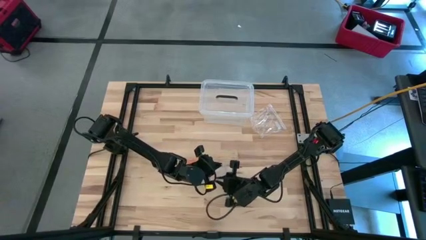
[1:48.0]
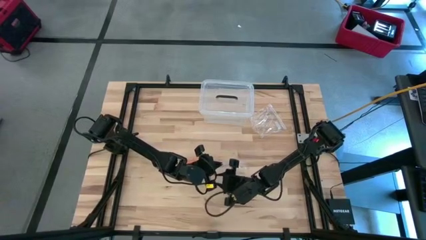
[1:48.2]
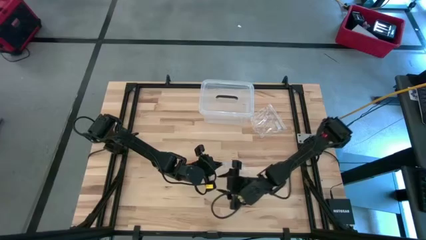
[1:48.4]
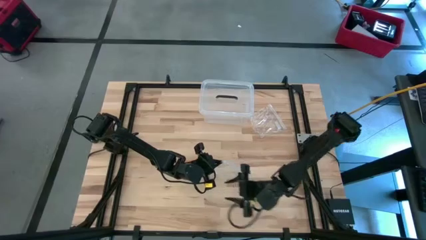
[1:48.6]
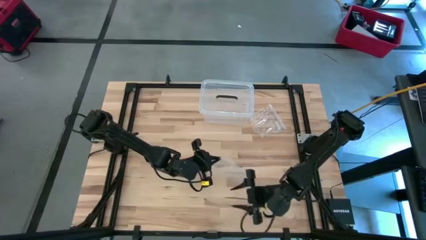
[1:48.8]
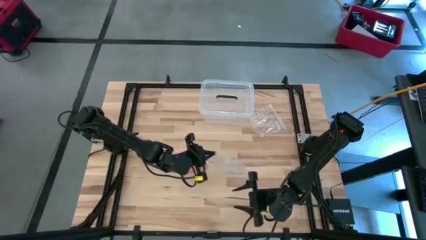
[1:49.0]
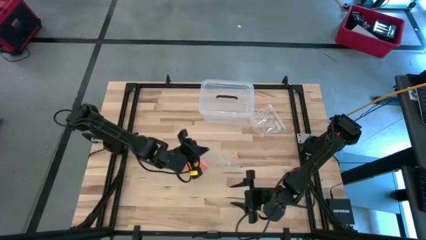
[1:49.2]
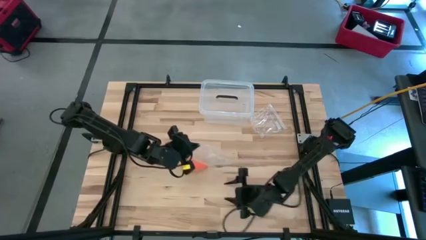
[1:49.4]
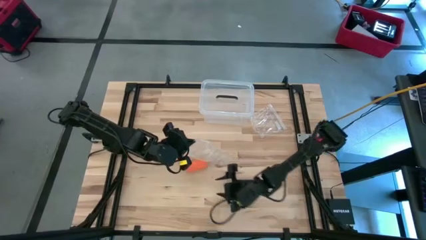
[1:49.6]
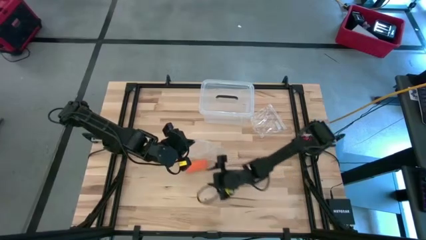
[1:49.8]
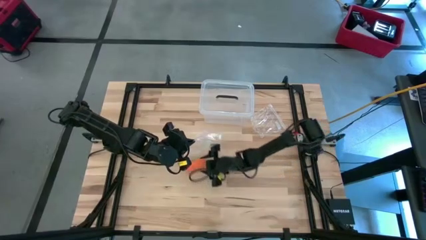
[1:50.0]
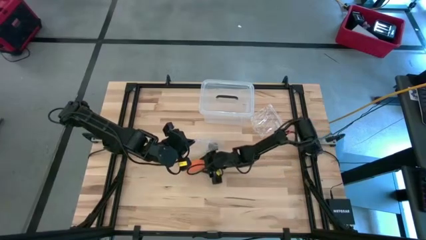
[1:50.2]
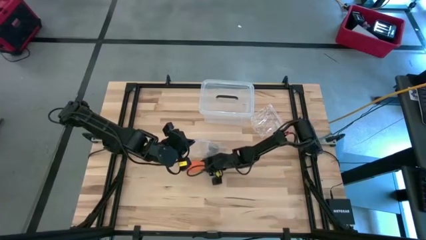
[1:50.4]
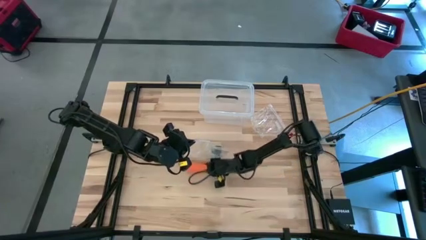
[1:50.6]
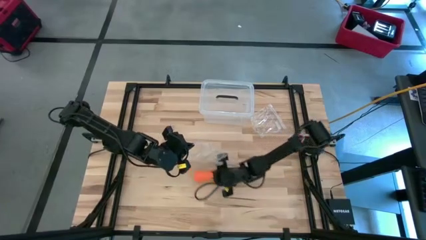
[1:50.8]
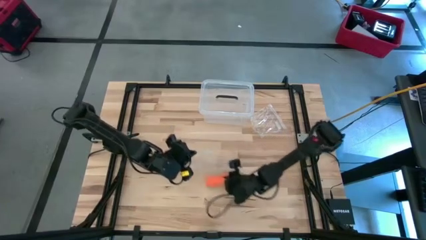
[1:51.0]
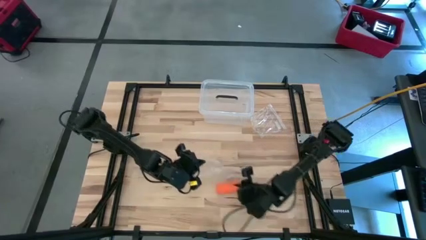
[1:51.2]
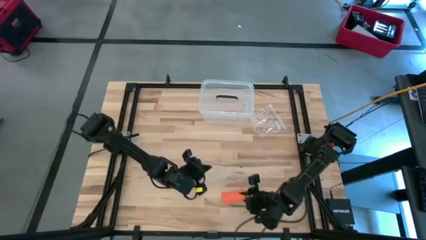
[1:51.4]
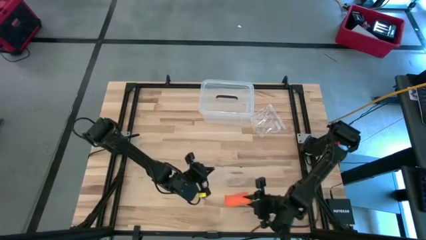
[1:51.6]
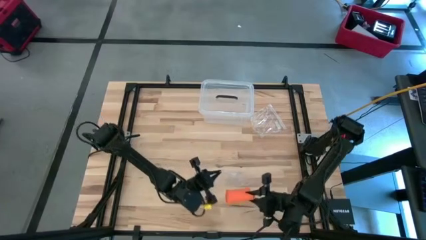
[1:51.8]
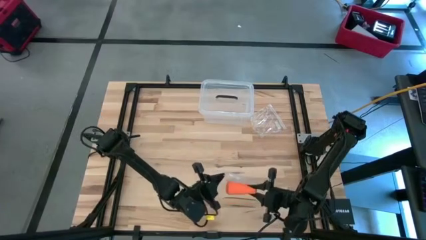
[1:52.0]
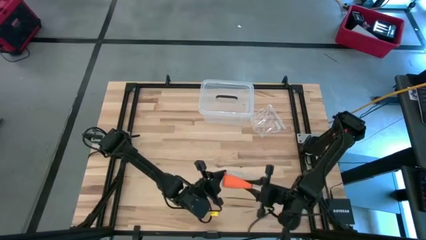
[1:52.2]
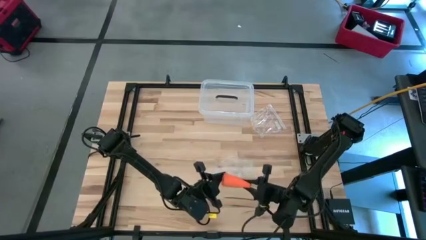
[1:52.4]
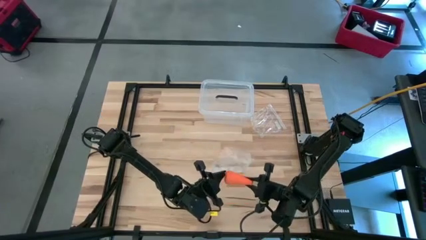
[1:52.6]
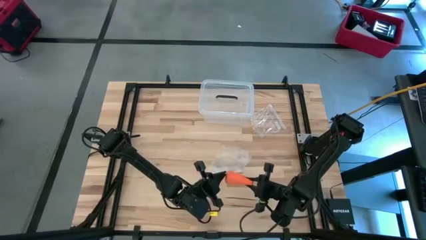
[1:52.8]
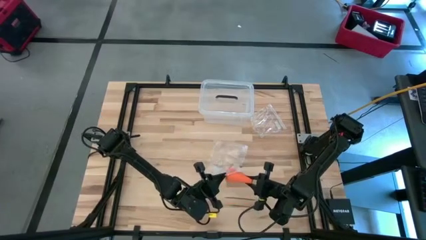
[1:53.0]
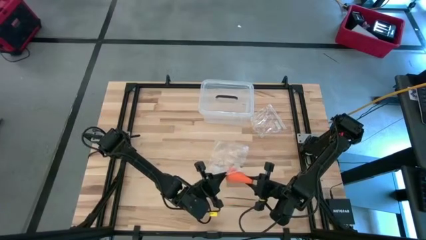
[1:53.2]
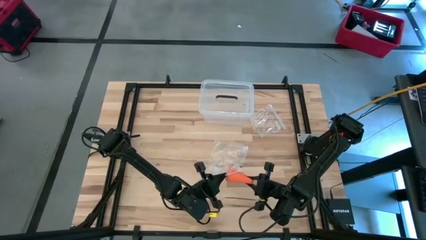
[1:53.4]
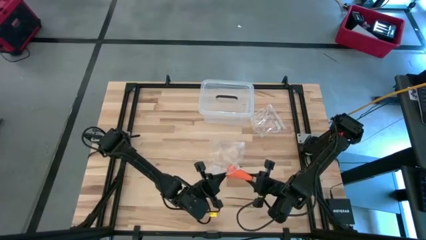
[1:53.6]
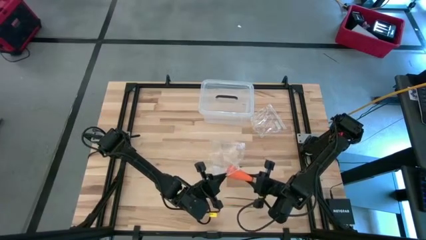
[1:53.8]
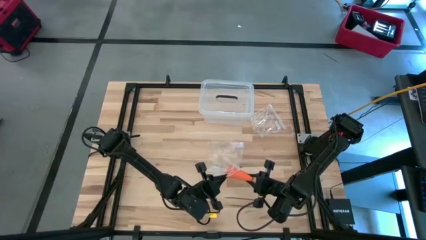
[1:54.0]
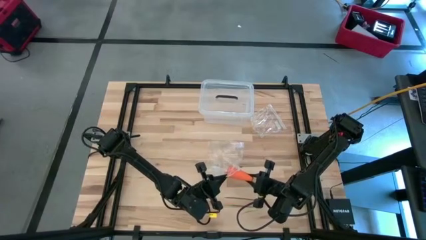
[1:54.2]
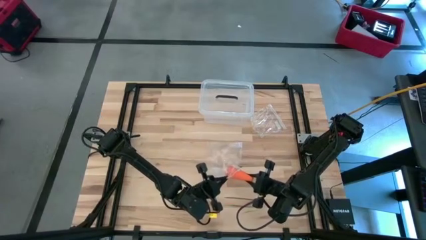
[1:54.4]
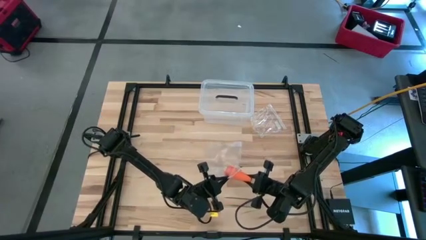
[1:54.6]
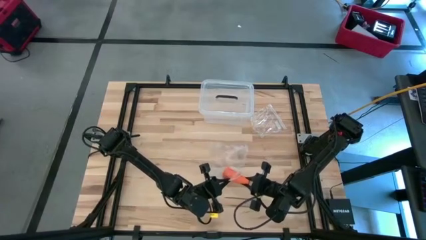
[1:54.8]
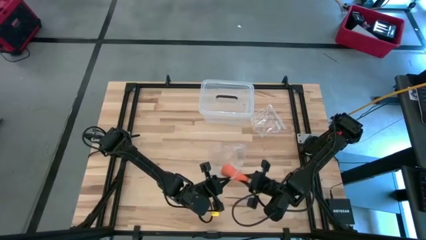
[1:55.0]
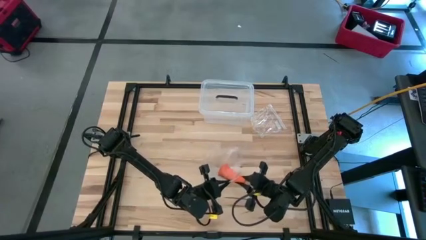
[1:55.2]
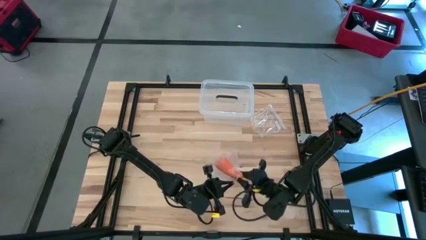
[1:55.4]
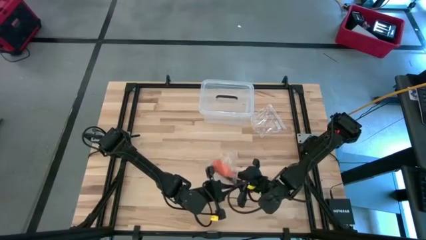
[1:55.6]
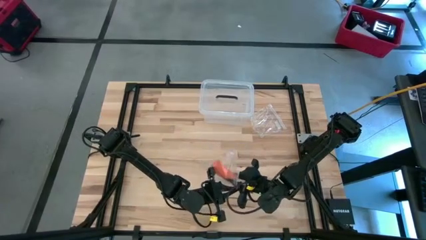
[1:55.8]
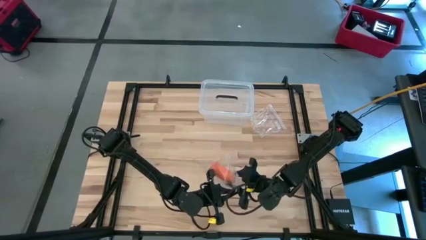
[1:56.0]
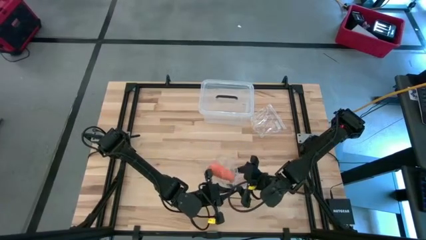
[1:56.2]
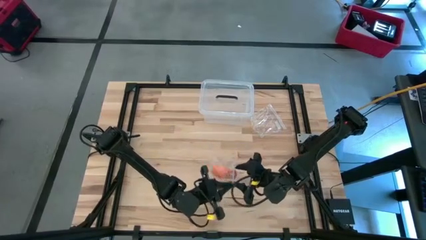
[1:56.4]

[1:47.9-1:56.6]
Task: Roll bandage
Put the orange rolled bandage into the transparent zip bag

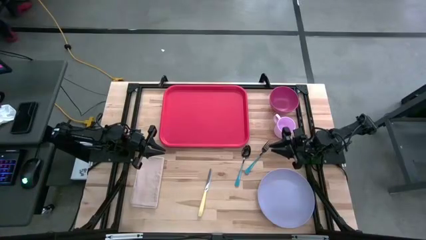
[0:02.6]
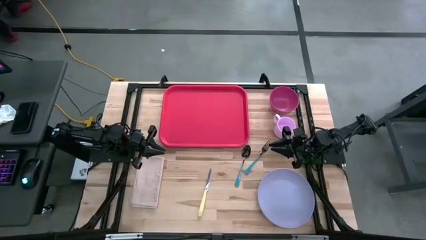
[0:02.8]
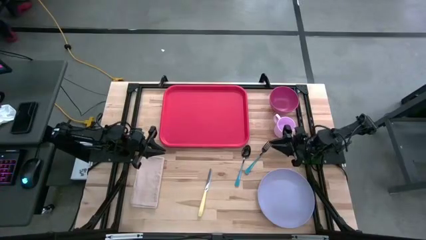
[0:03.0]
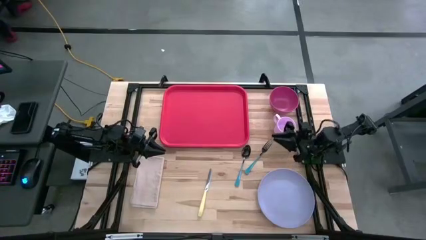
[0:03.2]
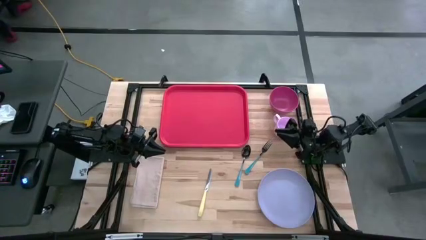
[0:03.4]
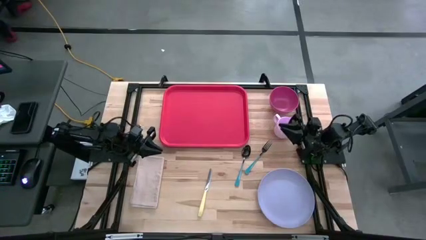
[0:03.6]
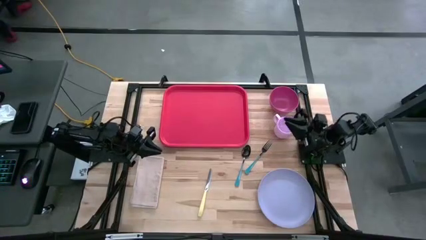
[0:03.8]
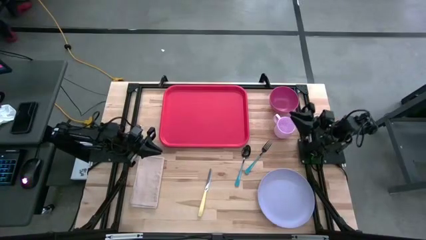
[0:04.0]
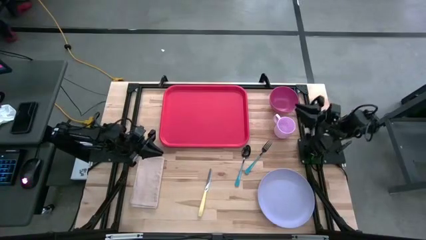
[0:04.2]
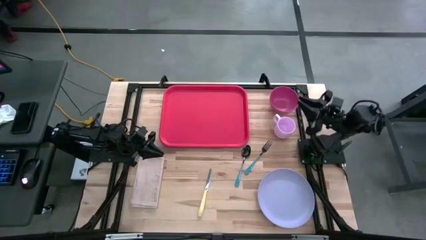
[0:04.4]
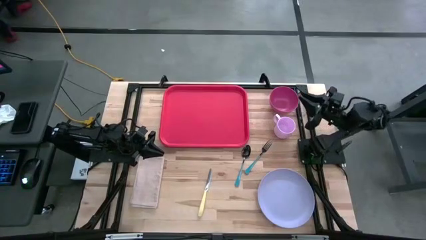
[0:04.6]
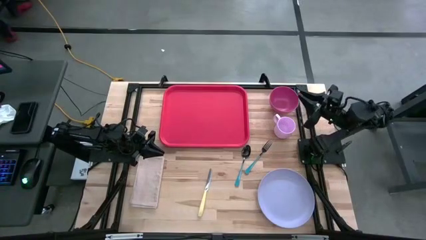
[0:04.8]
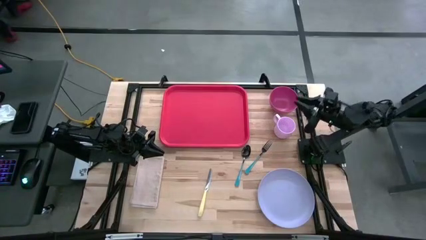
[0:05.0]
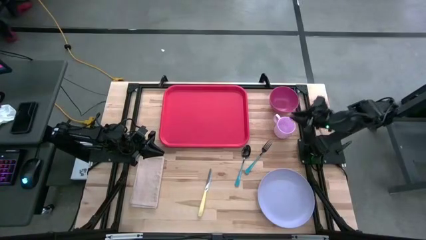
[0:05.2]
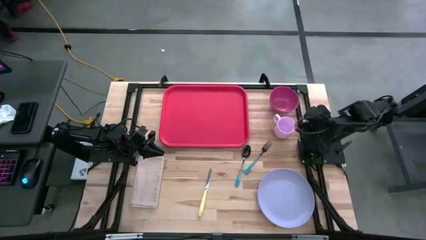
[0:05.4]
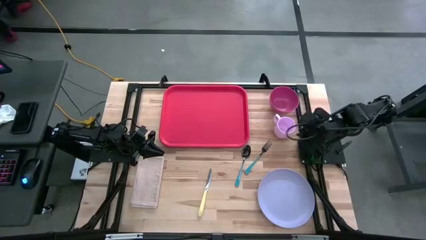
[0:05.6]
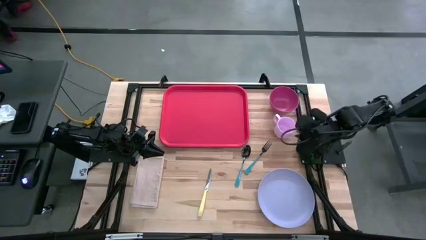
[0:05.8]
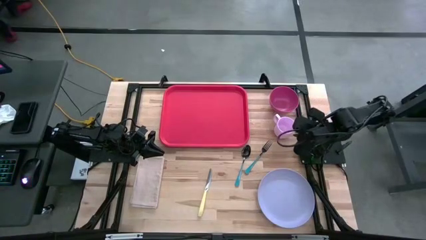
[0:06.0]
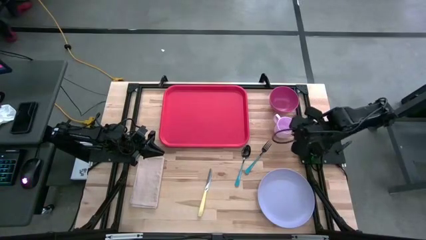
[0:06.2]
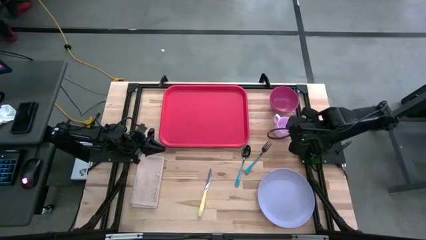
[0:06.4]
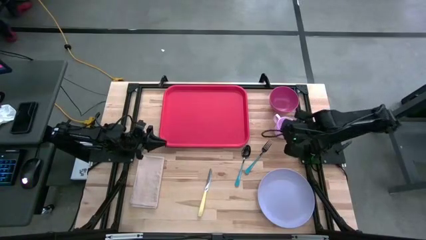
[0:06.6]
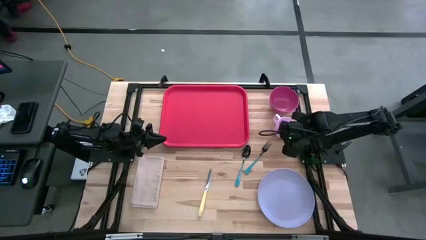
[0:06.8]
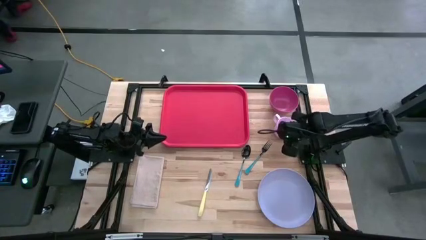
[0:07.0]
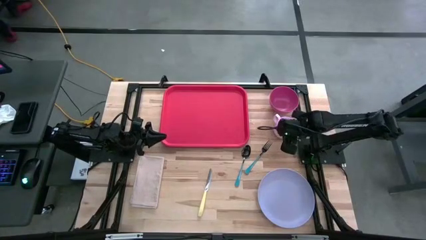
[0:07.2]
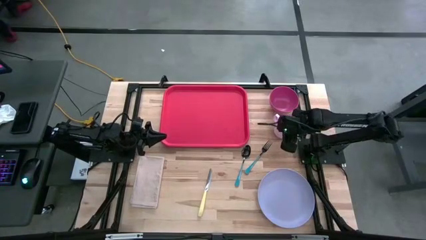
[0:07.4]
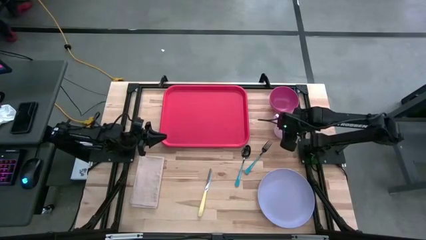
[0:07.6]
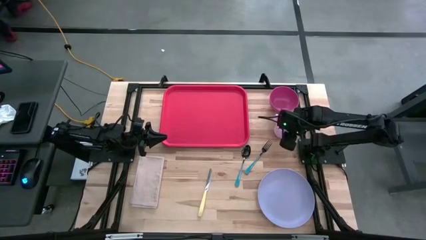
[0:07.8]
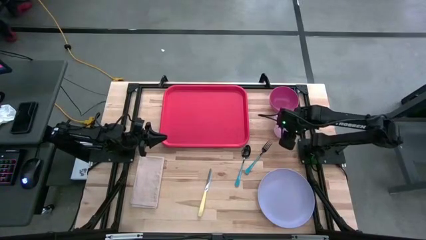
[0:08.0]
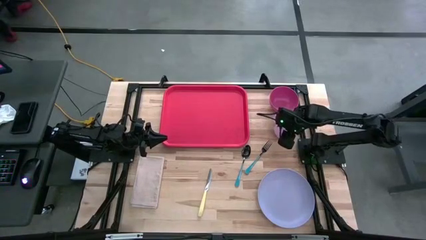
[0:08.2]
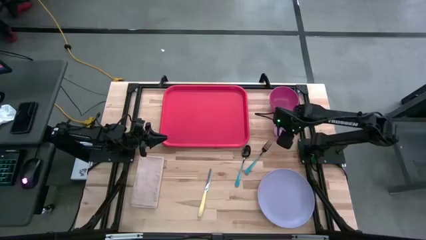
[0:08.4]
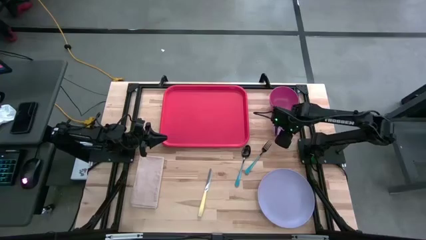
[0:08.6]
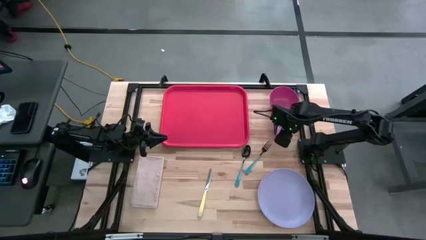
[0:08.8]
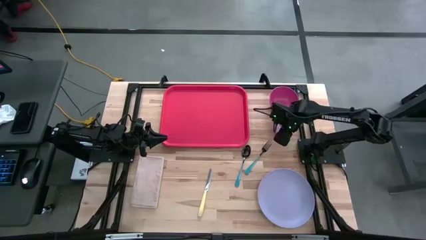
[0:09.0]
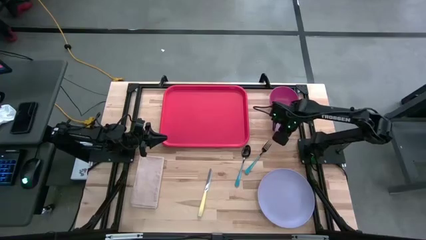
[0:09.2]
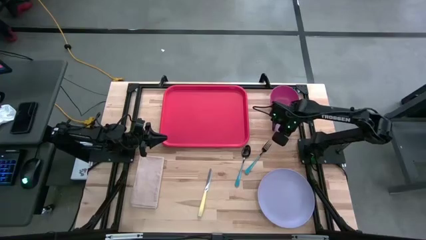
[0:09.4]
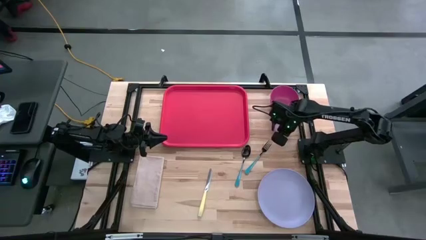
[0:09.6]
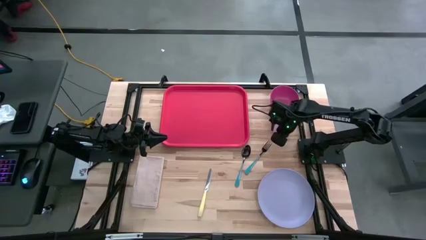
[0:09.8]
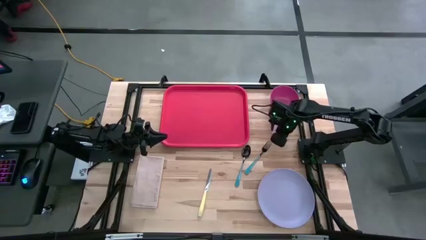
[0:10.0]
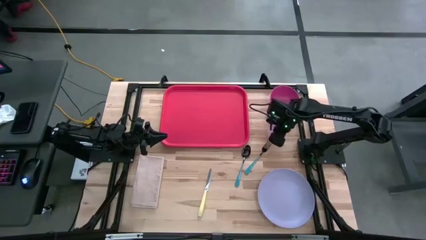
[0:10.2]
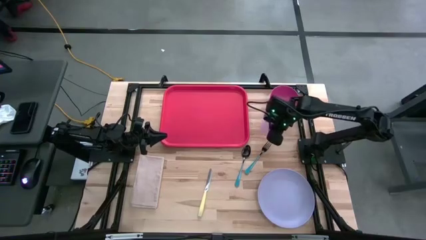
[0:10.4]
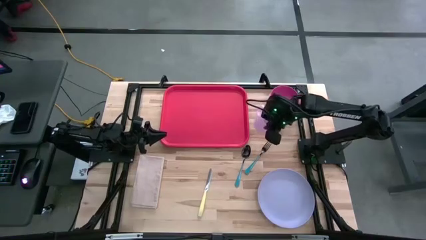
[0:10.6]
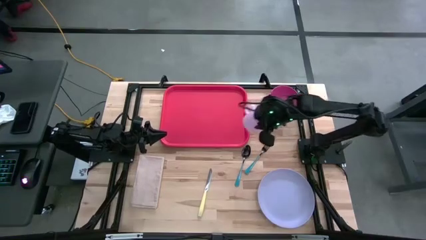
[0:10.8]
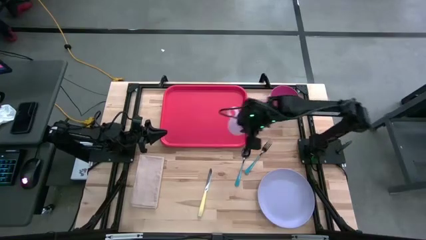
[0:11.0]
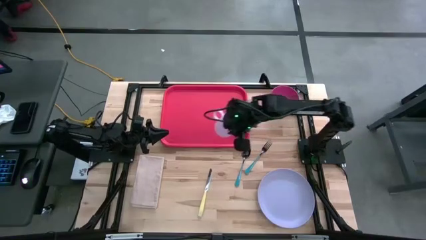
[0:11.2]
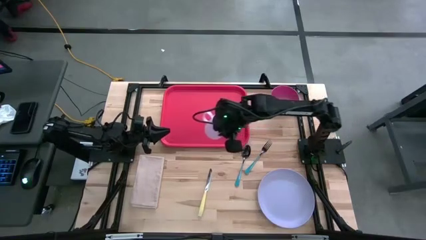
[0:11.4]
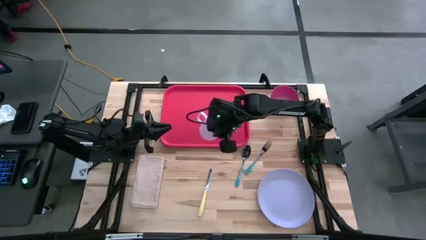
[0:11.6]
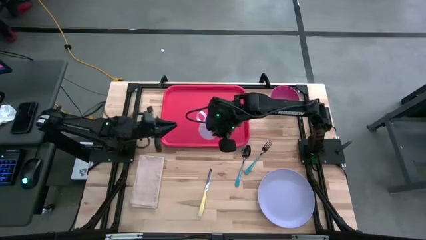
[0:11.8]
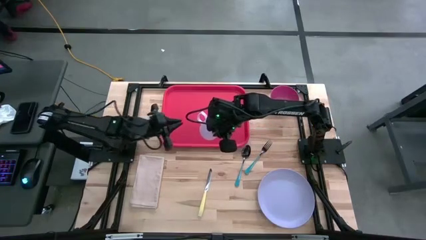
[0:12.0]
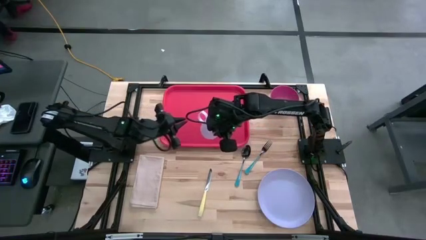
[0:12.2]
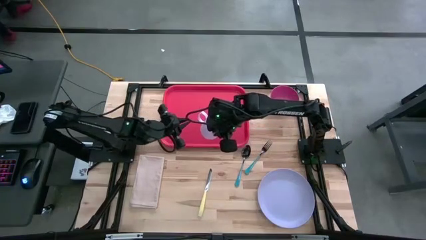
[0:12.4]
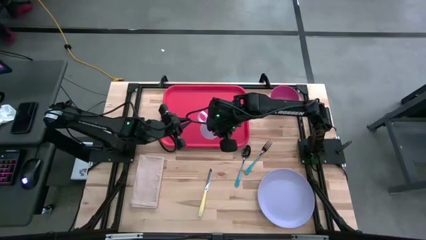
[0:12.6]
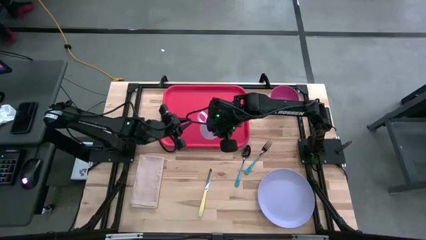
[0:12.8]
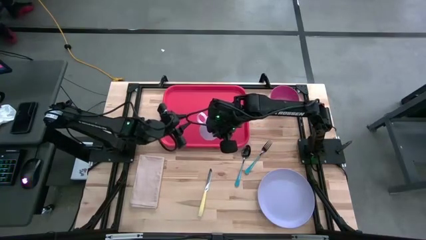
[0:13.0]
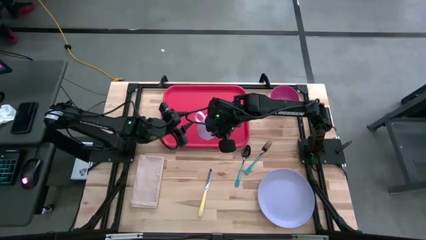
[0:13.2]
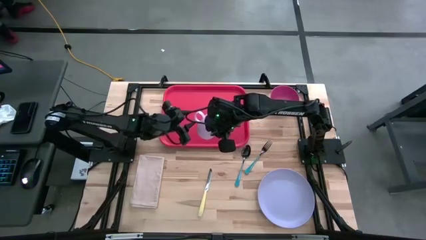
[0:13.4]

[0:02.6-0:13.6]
Task: Set up tray
Put the pink cup on the red serving tray
